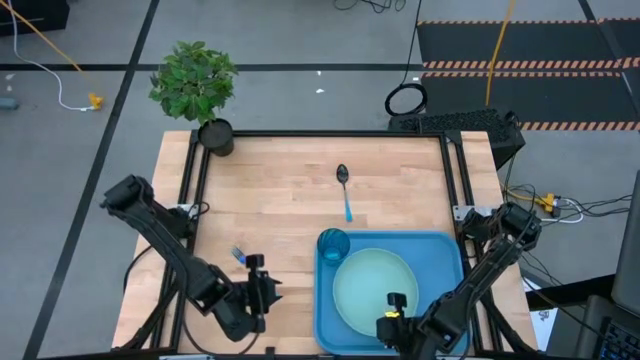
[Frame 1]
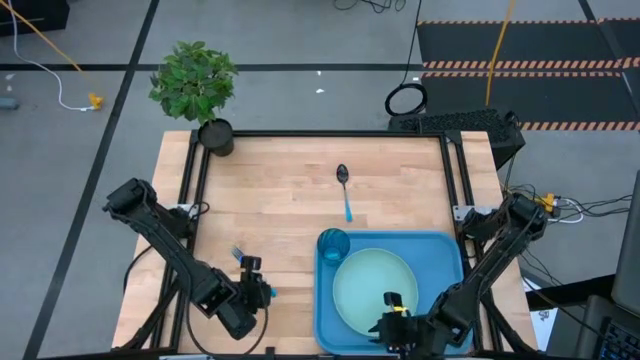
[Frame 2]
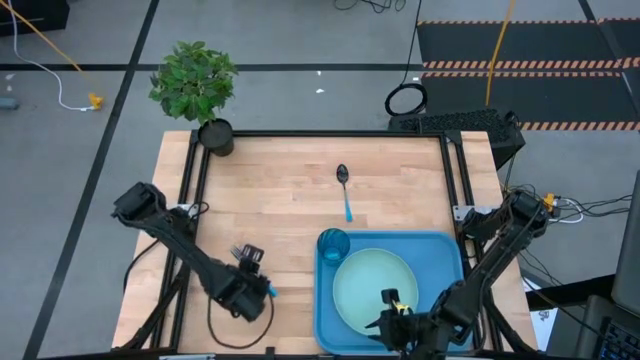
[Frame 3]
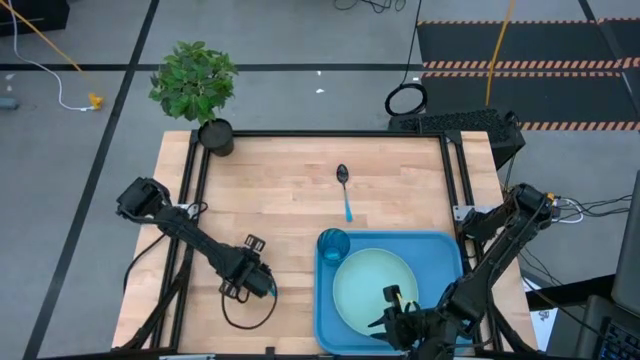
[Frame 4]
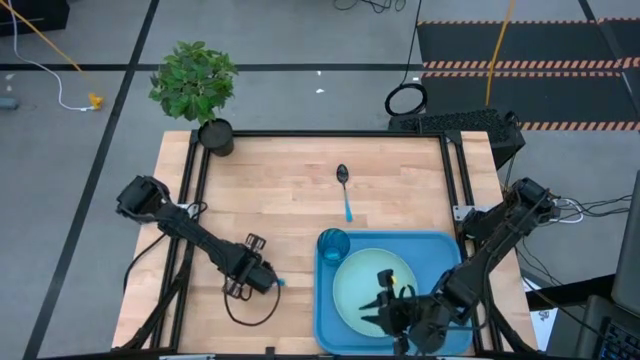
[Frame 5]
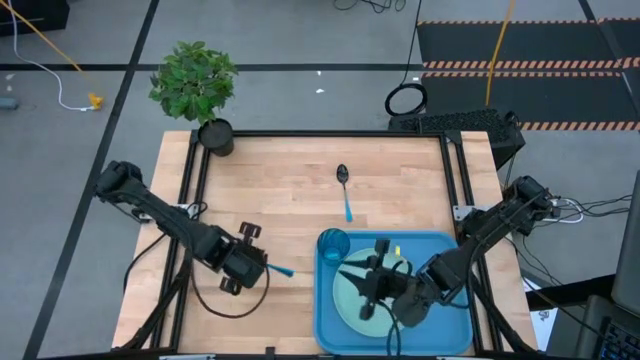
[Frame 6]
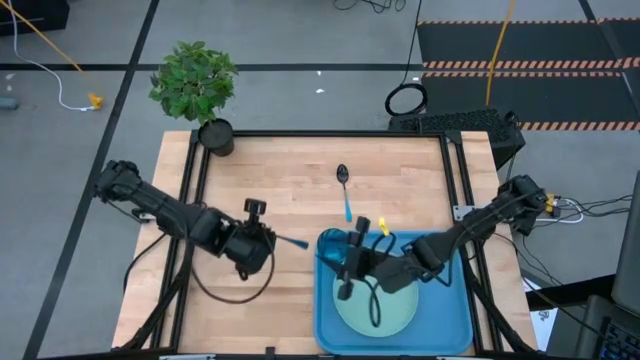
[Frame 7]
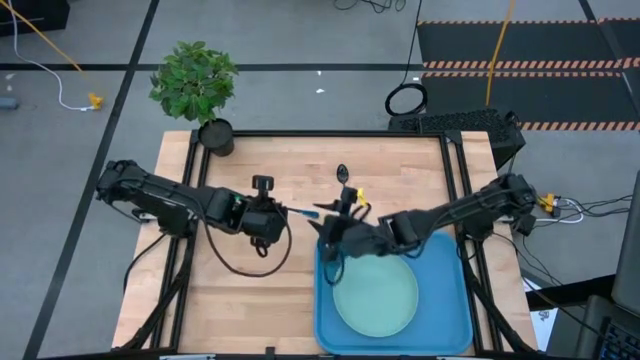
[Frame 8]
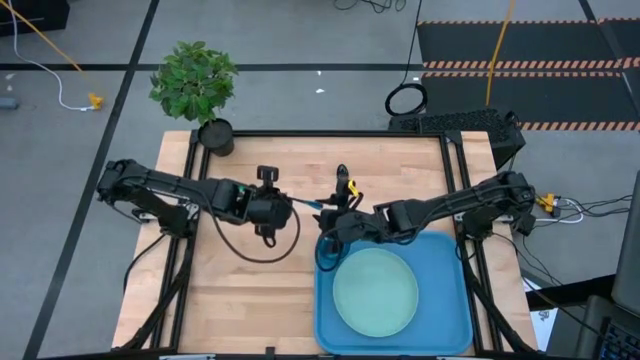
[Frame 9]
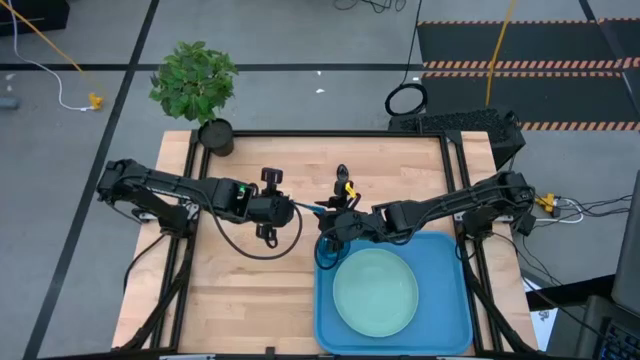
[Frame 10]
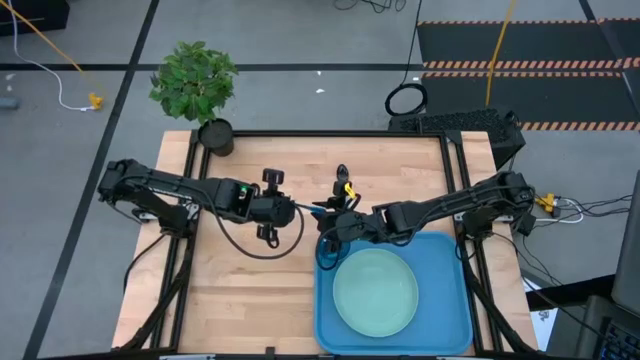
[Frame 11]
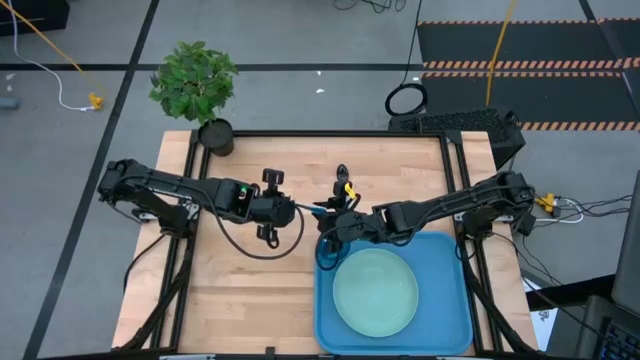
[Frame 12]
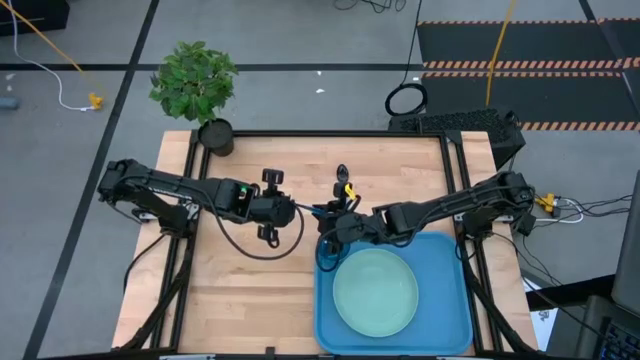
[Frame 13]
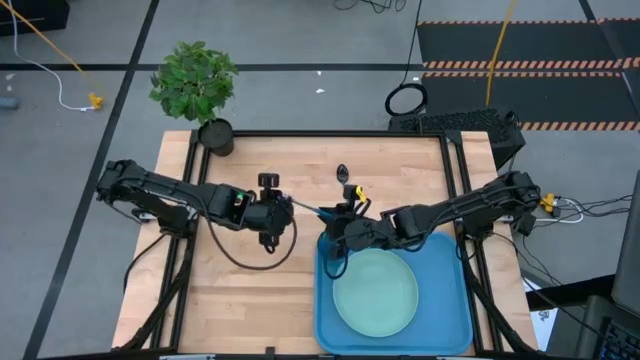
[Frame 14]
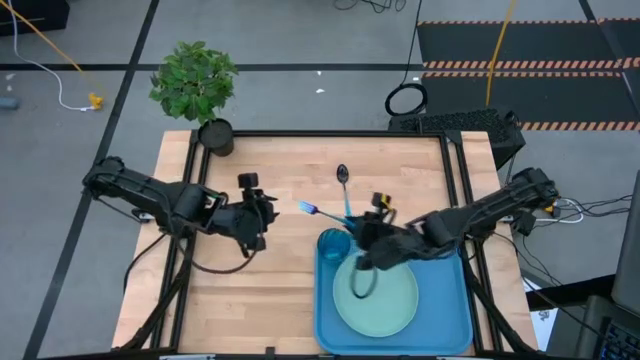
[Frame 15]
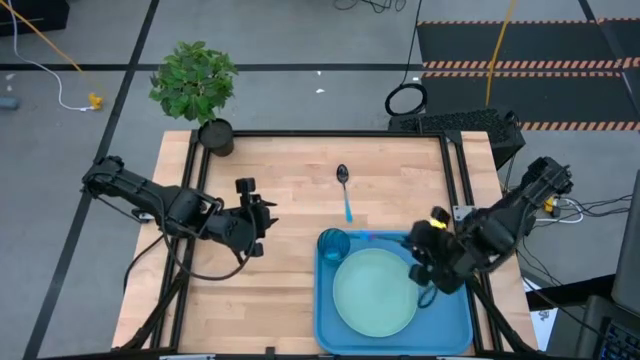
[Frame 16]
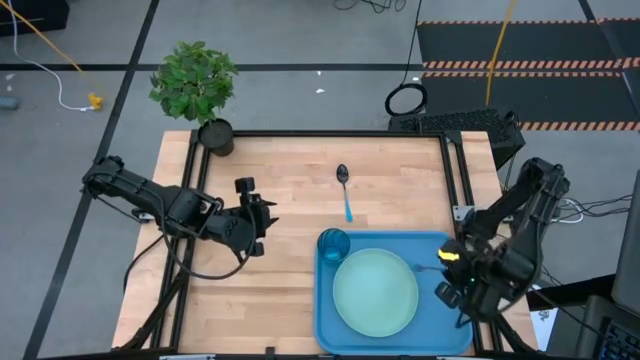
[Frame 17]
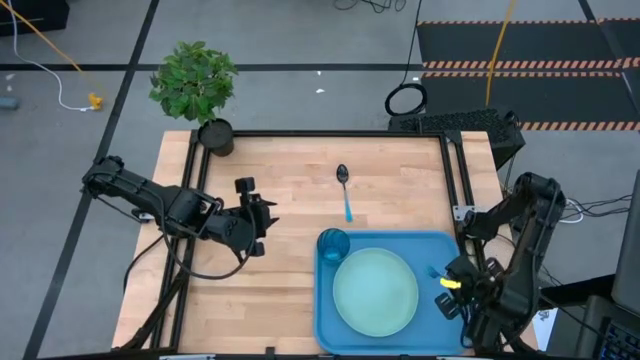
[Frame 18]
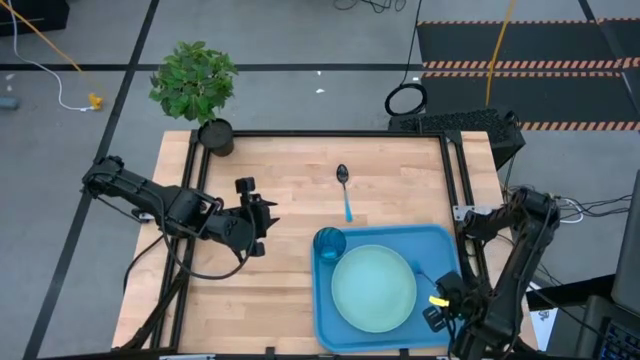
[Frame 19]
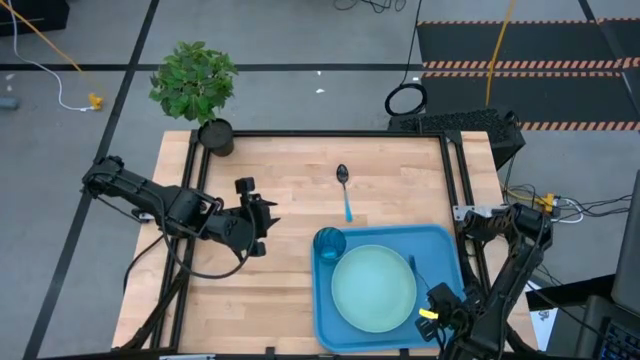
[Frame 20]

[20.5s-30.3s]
Task: Pick and place plate/cup/fork/spoon on tray
Put the fork into the food tray

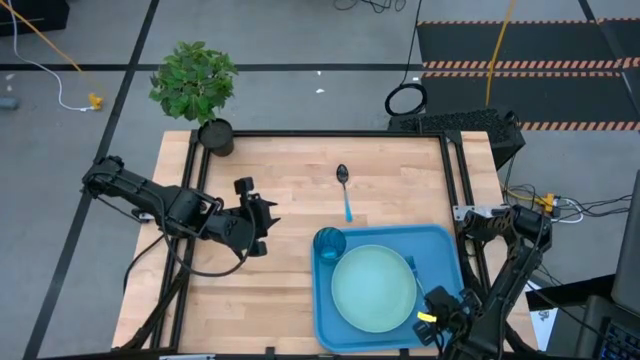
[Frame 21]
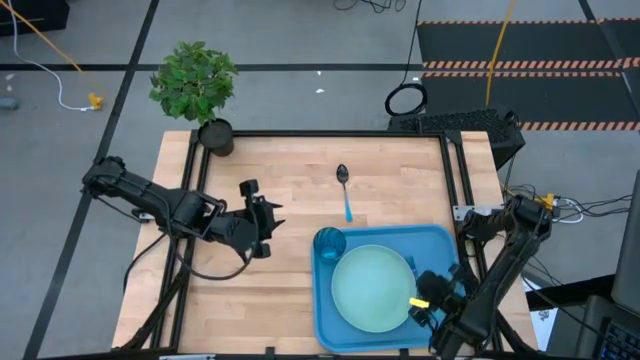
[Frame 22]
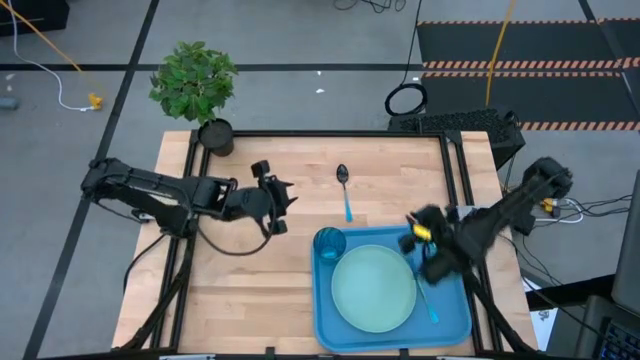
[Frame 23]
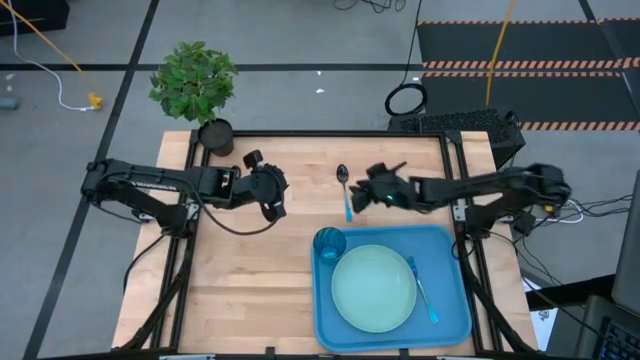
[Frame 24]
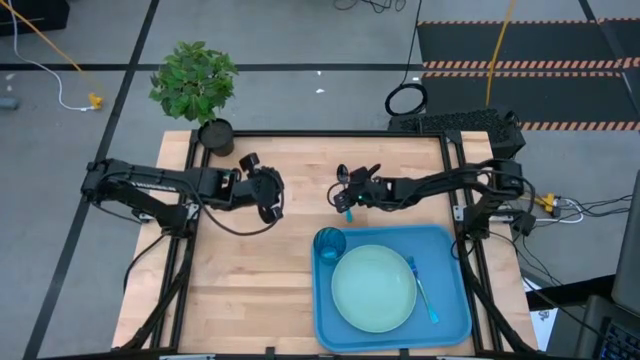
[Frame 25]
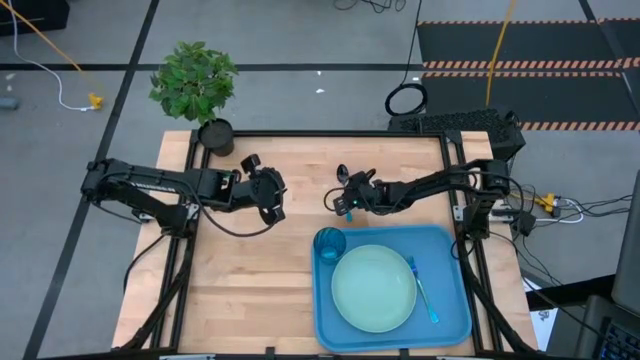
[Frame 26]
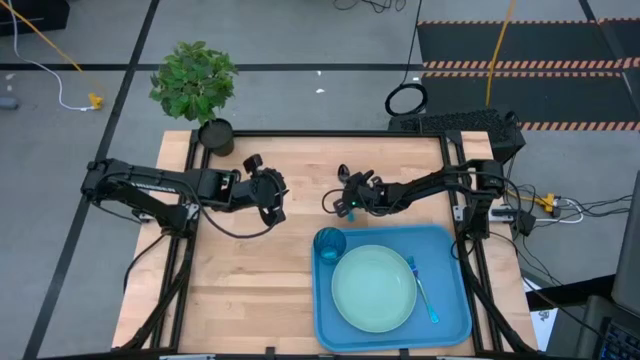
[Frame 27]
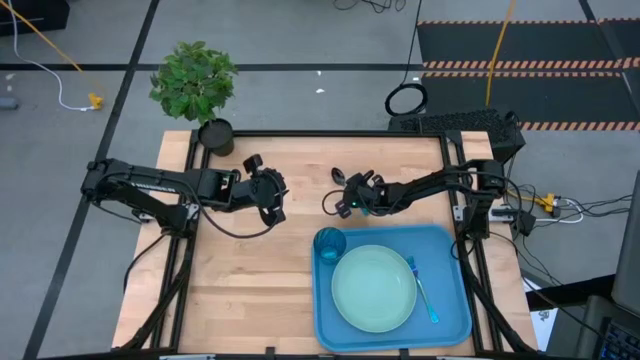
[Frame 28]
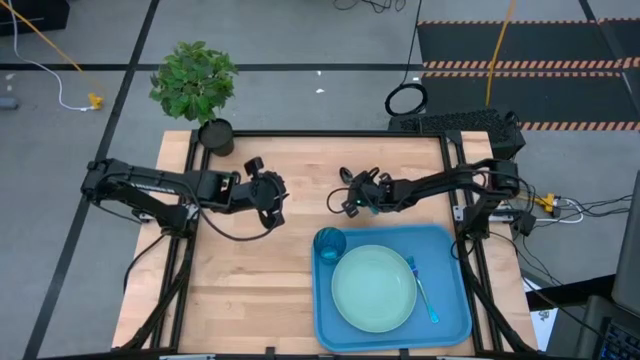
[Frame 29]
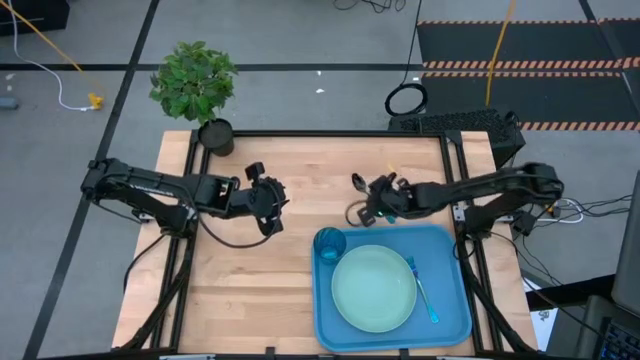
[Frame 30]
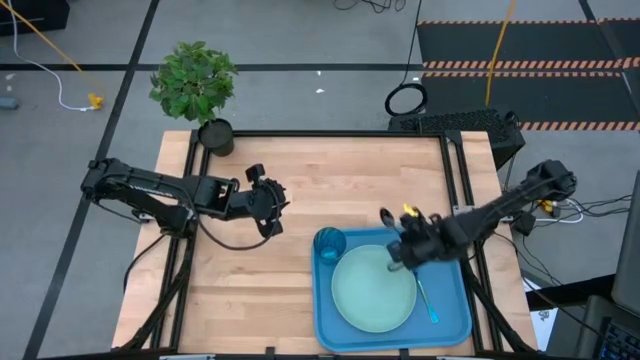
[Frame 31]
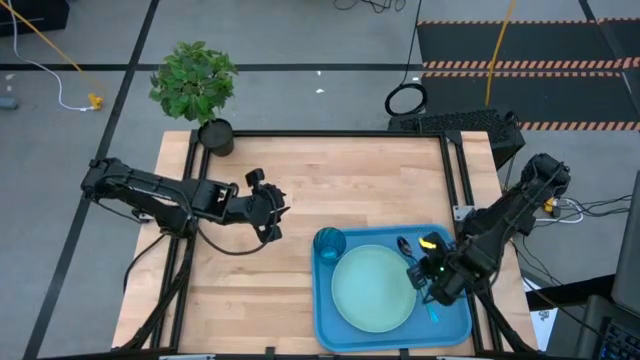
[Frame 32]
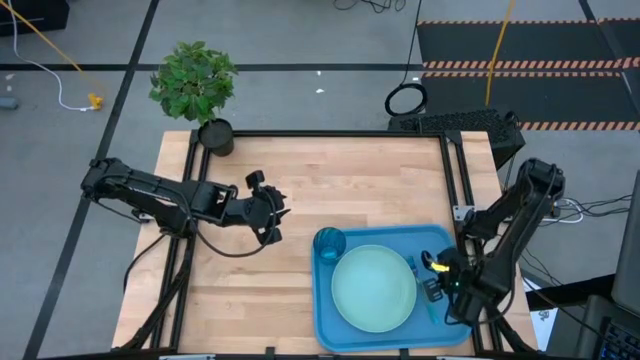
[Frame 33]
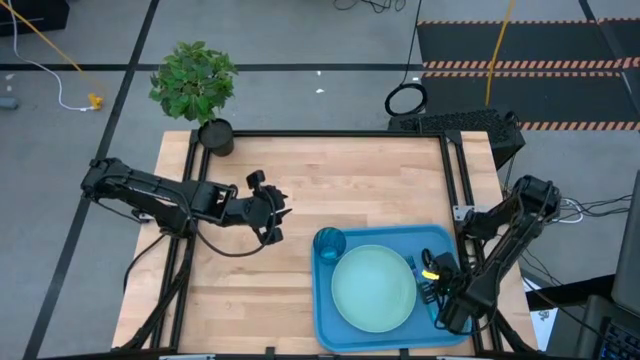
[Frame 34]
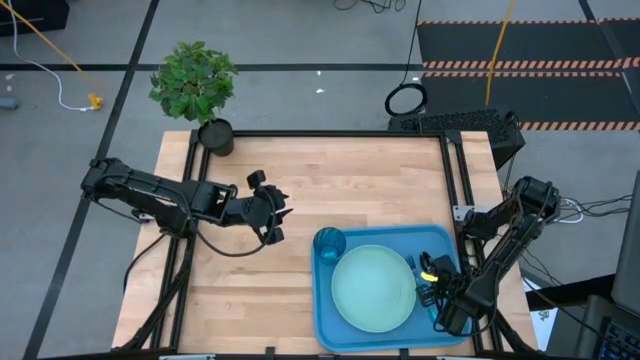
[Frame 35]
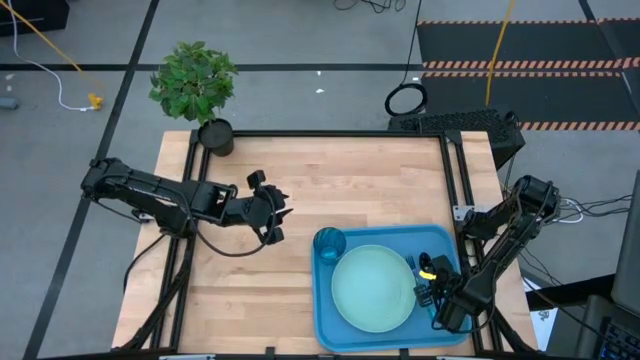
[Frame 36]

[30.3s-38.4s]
Put the spoon into the food tray

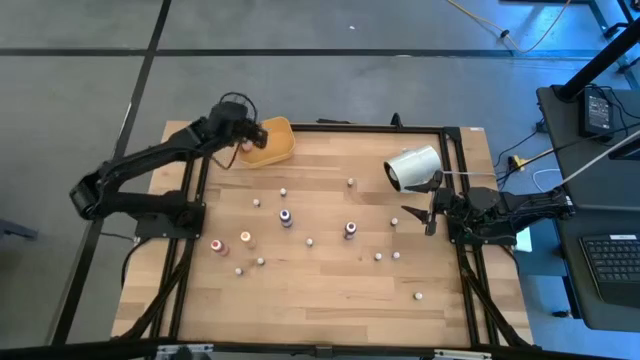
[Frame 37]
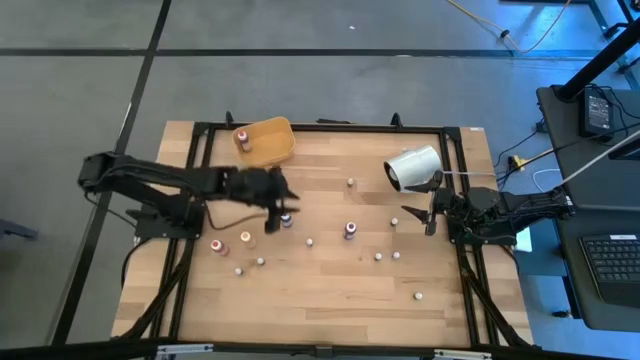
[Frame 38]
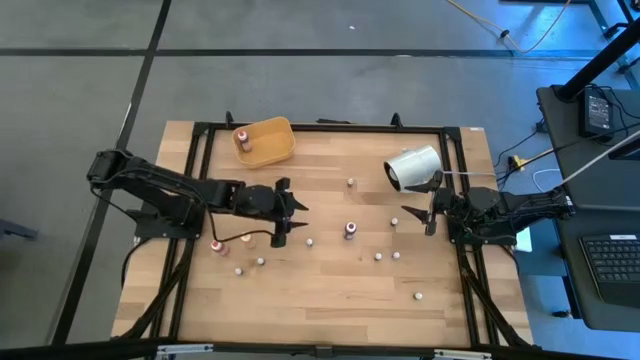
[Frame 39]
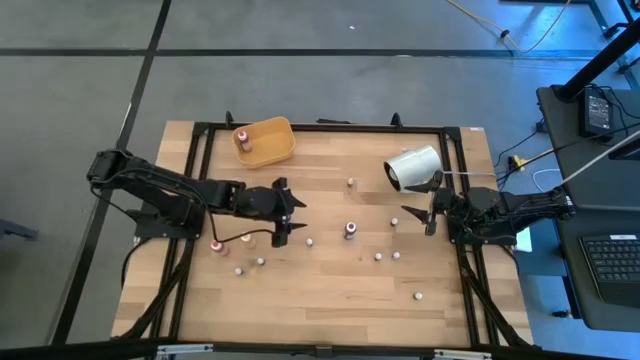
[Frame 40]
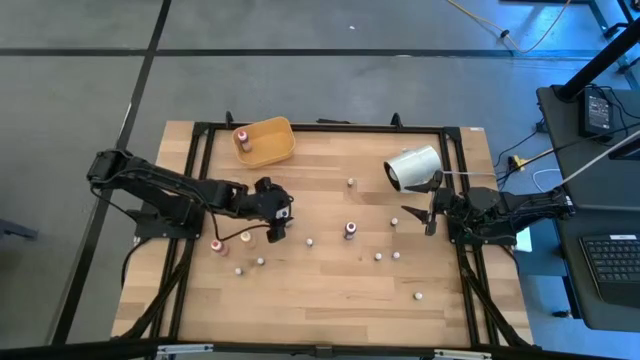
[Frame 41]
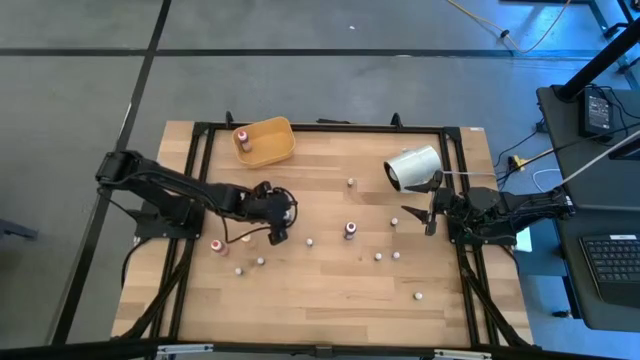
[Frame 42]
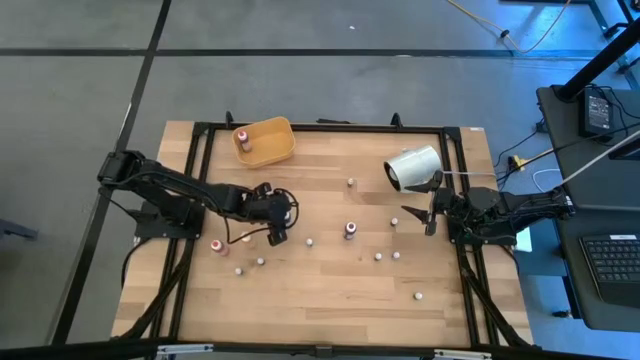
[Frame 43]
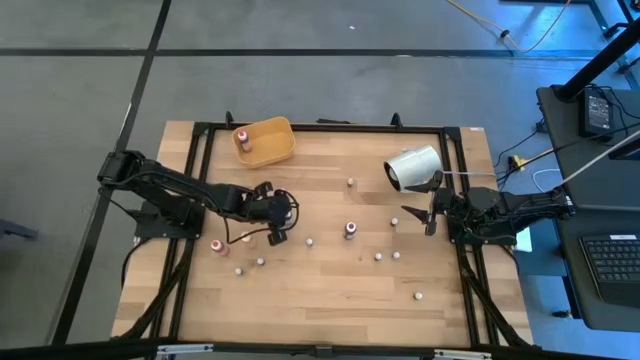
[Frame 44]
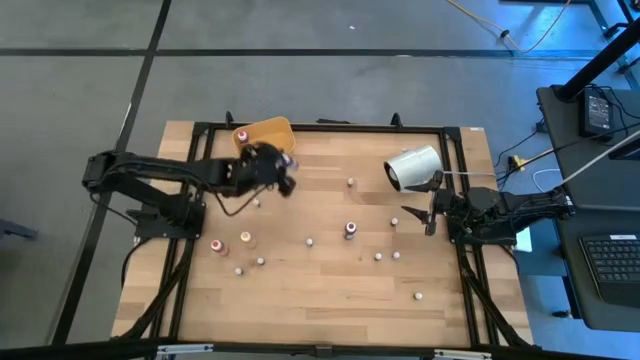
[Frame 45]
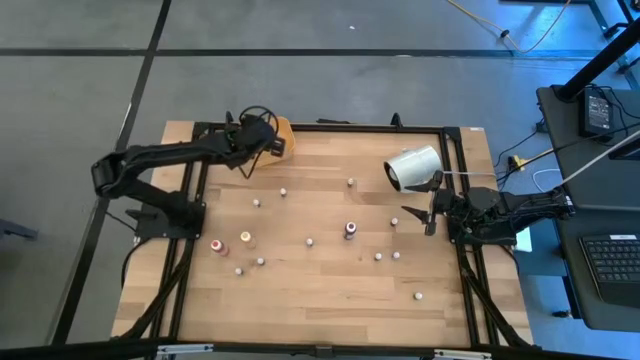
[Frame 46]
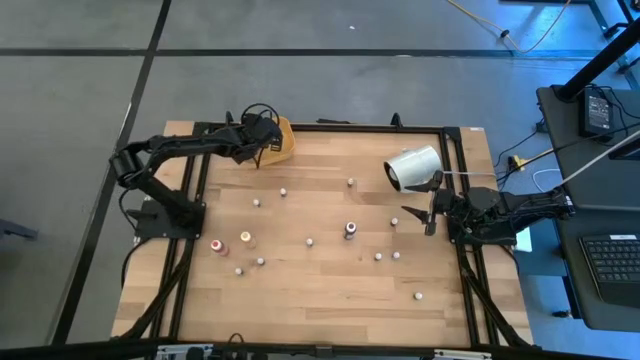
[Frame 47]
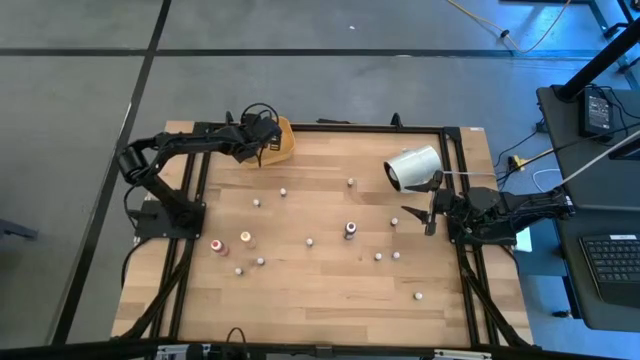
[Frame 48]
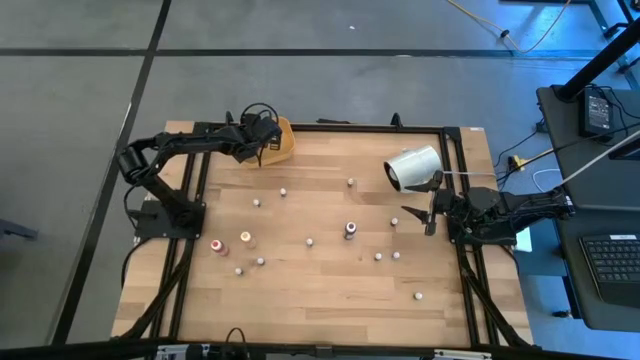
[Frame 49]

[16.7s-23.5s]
Task: Pick & Place food coloring
Put the large blue food coloring bottle into the yellow bin
